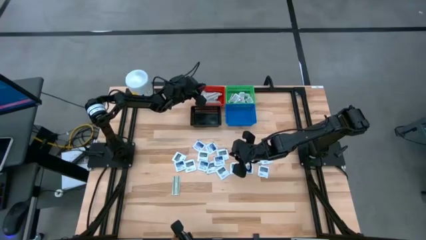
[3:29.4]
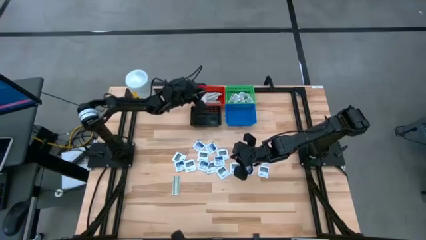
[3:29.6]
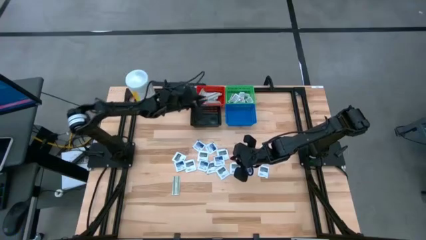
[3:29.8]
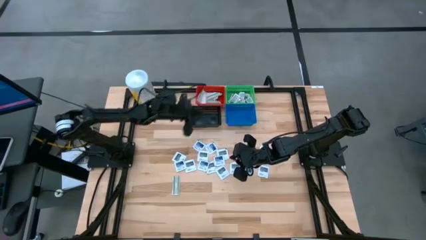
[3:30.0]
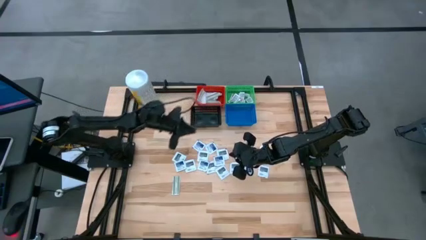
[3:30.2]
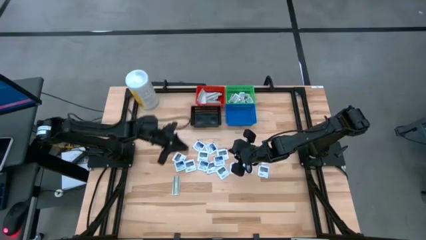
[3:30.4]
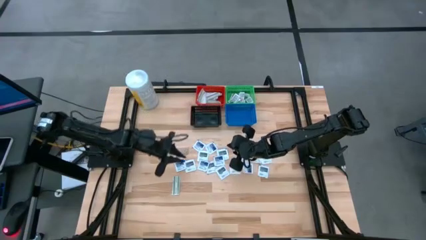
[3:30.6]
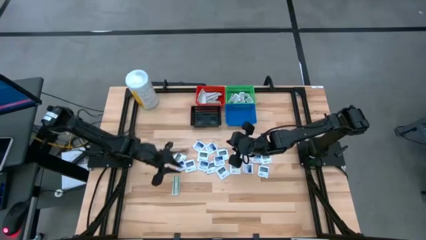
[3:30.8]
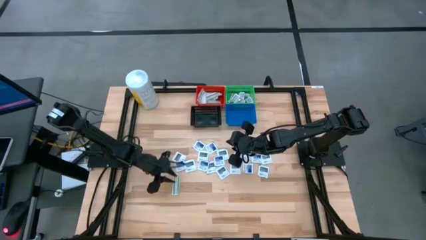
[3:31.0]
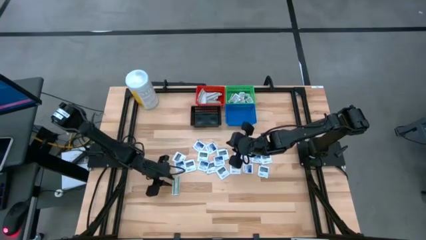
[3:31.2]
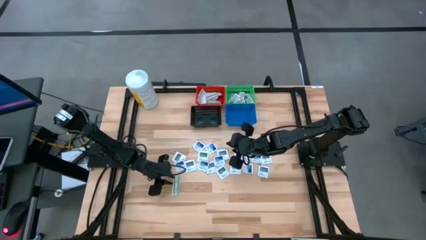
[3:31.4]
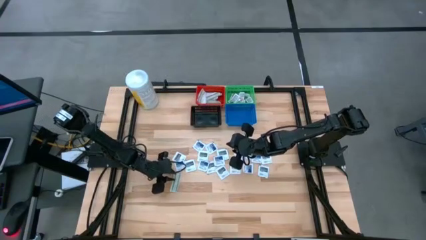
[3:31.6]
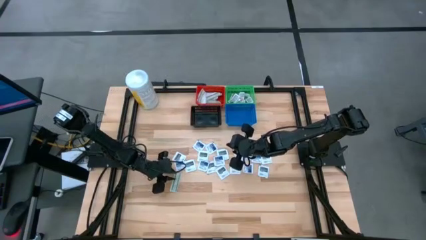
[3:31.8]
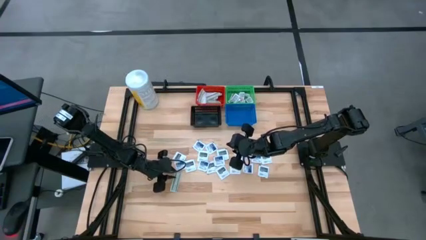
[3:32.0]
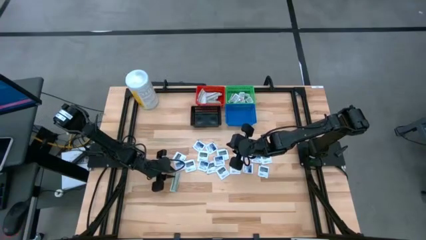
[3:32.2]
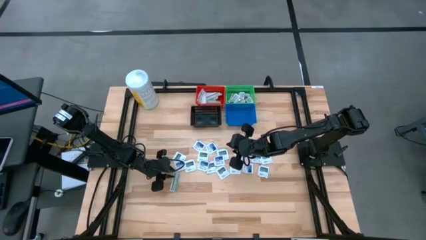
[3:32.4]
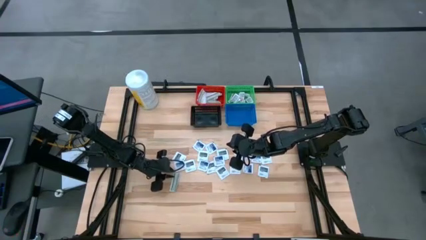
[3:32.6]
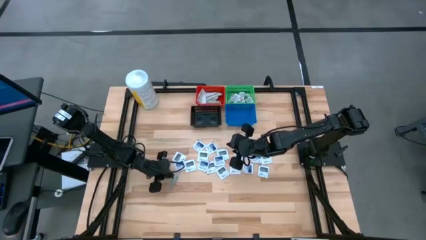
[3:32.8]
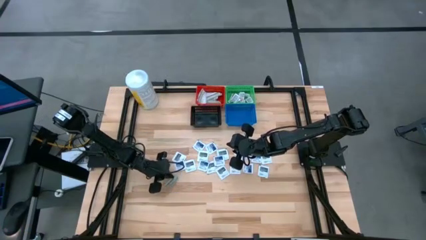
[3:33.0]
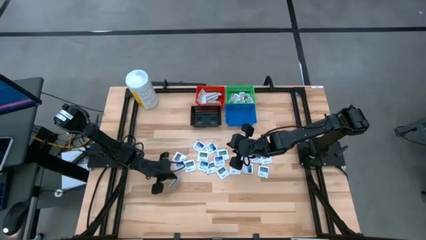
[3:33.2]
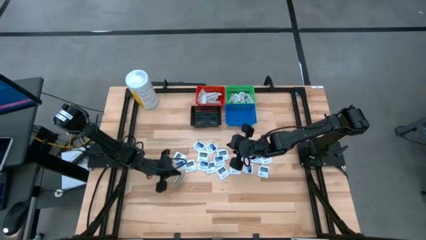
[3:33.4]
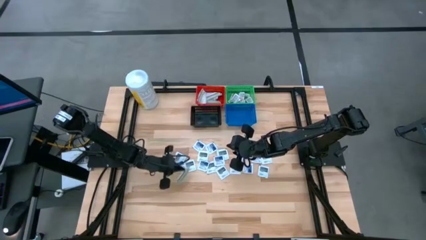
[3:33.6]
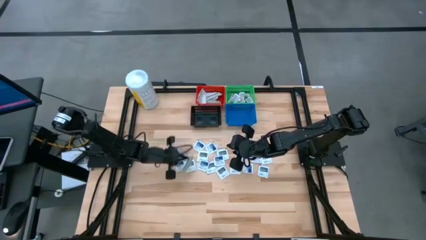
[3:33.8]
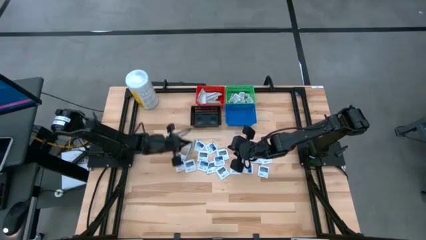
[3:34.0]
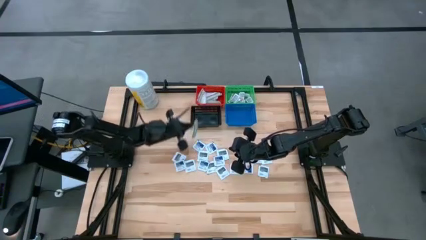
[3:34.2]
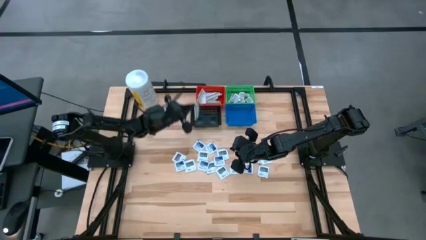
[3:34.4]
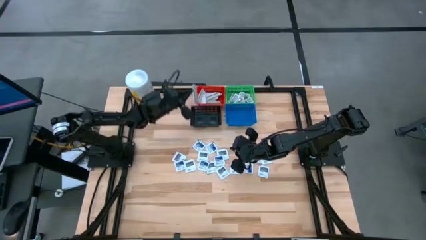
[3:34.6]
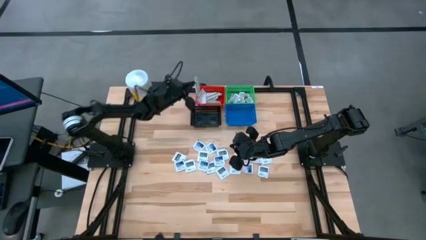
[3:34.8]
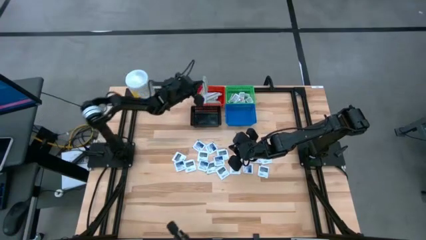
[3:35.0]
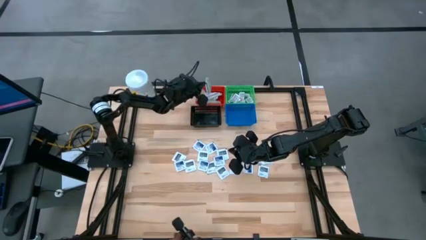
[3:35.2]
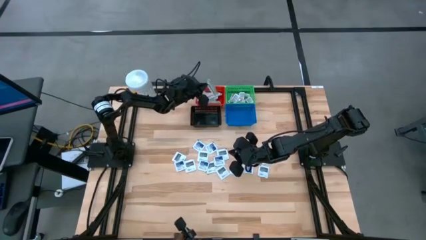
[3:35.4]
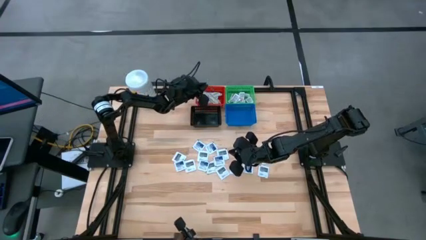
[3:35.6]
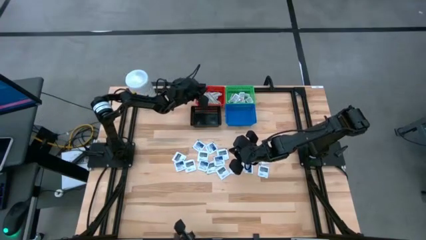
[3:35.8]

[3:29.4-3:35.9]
Task: Pick & Place First Aid Supplies
Put the bandage into the red basket

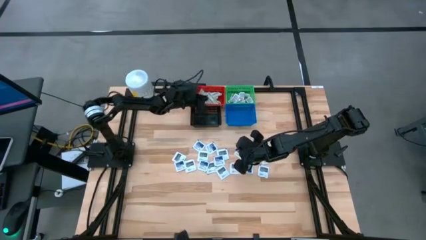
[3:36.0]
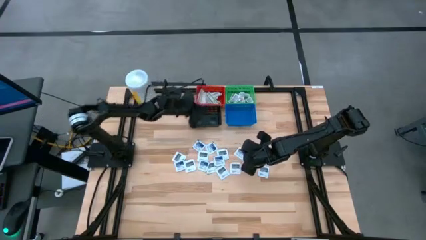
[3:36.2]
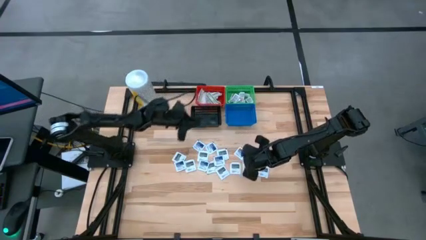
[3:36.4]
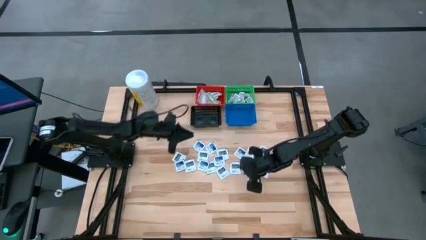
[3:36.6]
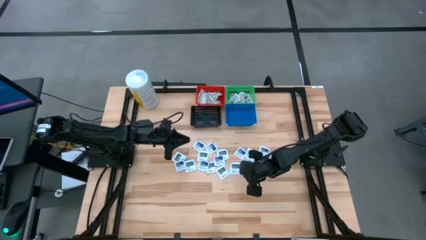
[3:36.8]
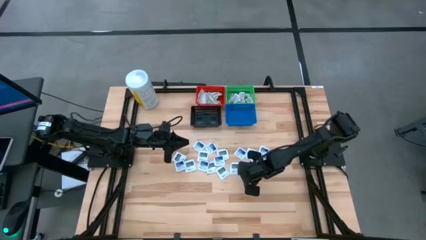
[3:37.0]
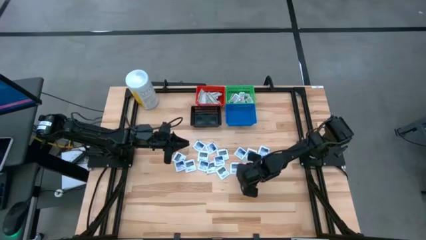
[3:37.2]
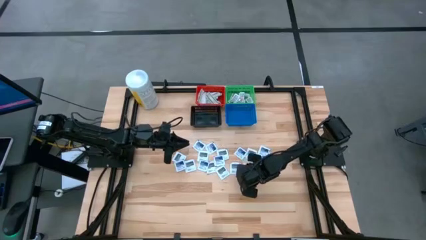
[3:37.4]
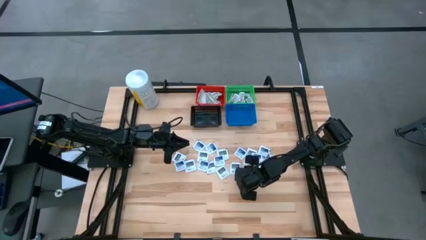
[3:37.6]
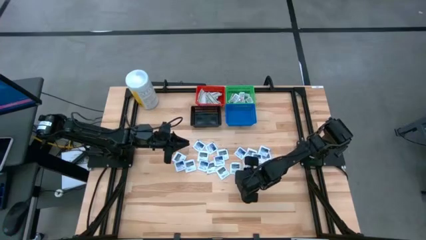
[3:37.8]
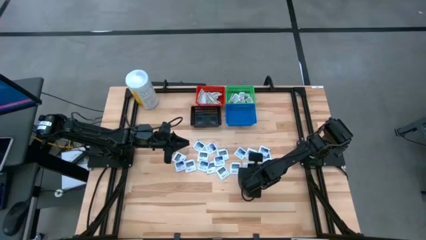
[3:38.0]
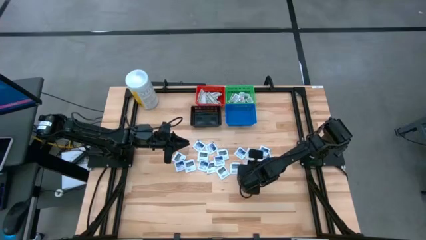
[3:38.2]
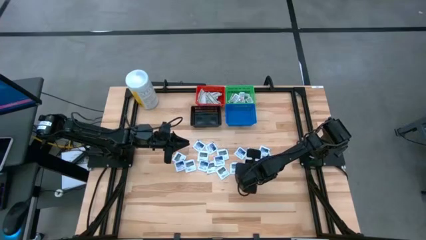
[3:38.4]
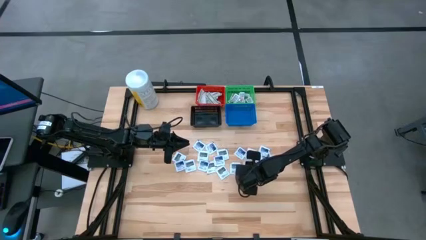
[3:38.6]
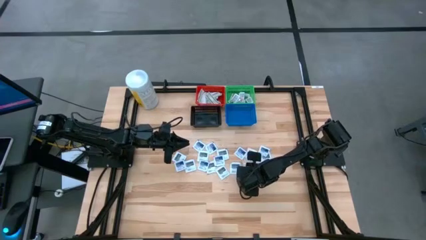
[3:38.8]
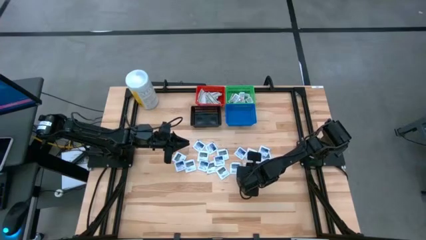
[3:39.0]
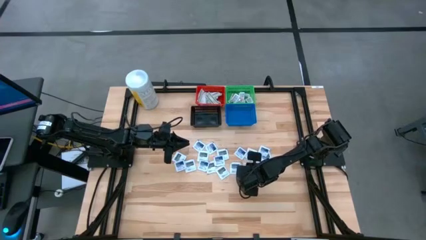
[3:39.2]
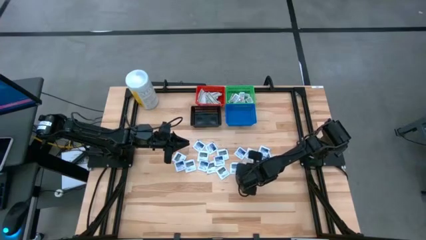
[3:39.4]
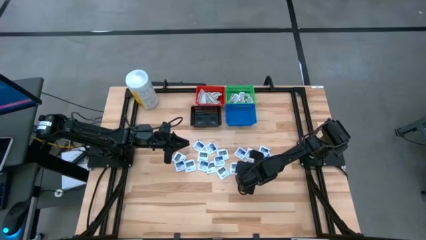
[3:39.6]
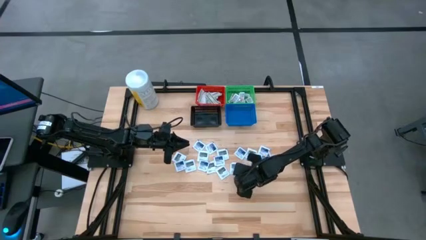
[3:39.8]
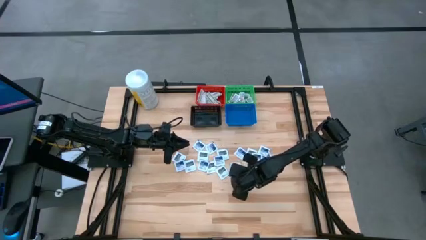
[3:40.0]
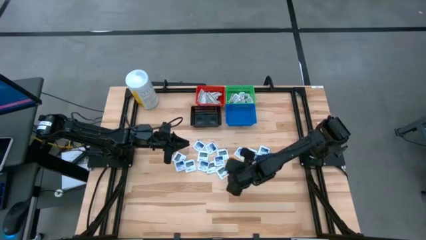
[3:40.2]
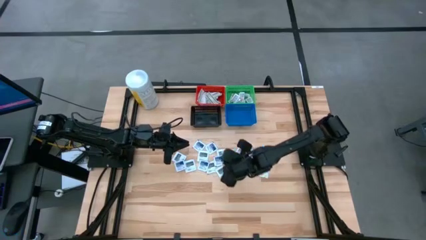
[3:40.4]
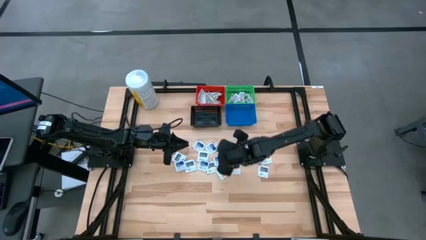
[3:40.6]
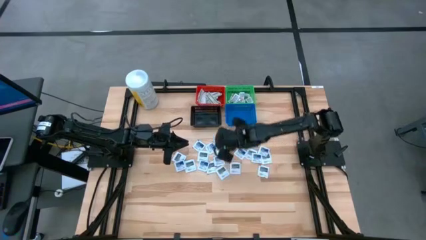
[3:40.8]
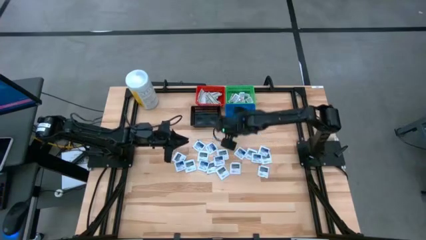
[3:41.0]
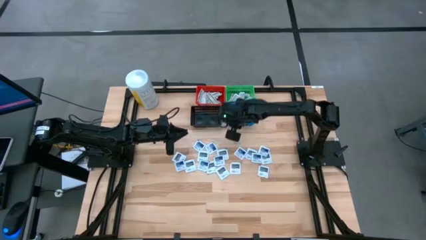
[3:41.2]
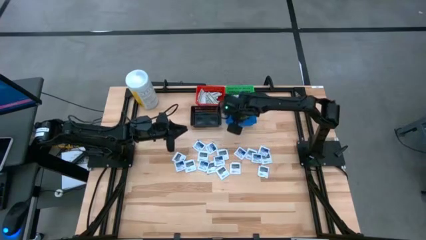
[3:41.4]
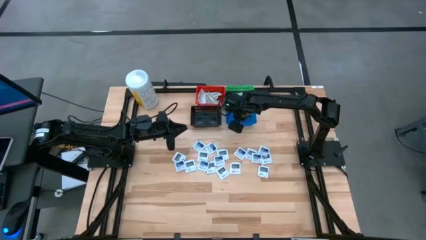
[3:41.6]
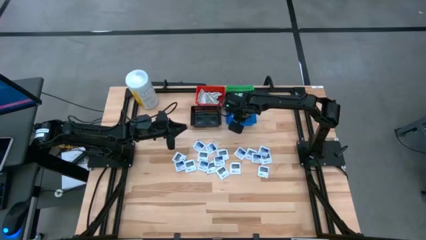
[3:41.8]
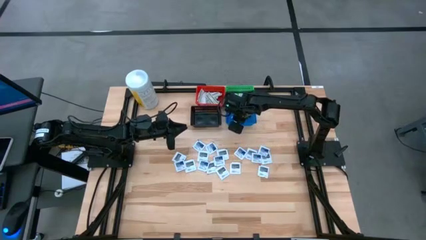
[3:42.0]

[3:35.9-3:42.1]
Put the alcohol pad into the blue basket

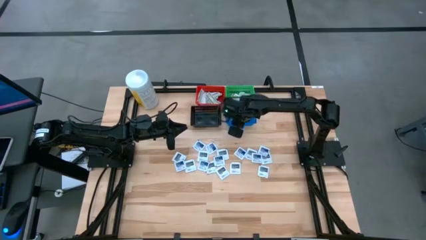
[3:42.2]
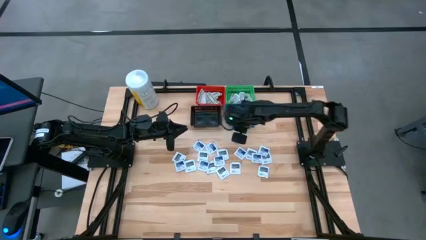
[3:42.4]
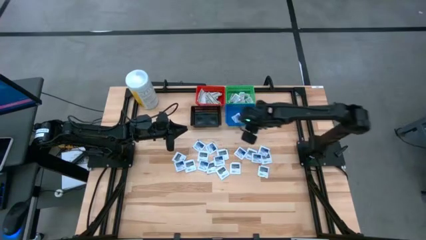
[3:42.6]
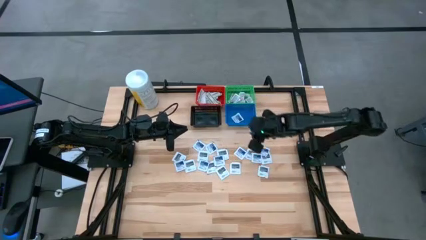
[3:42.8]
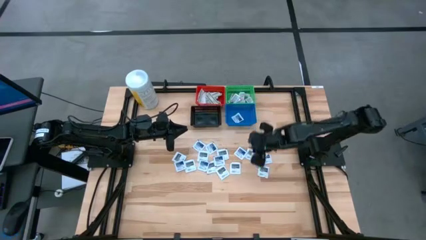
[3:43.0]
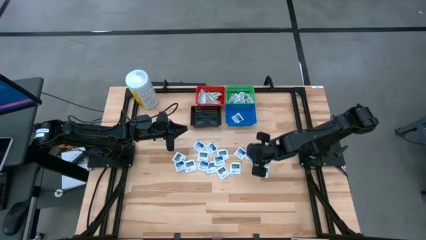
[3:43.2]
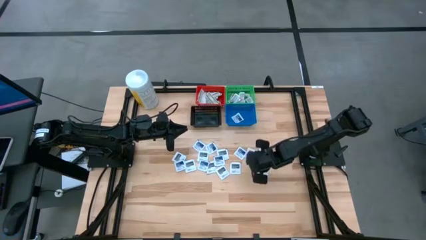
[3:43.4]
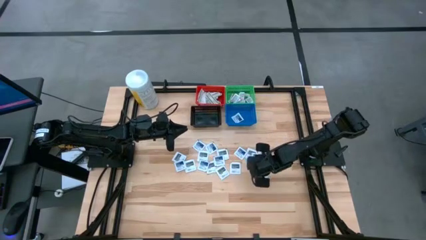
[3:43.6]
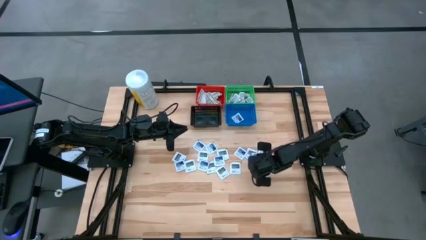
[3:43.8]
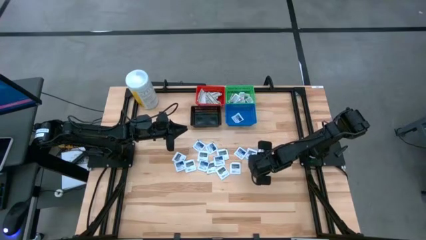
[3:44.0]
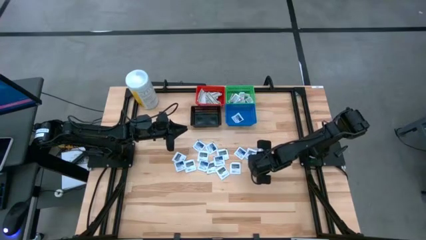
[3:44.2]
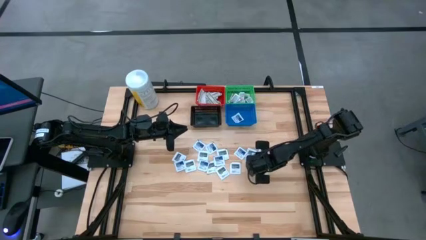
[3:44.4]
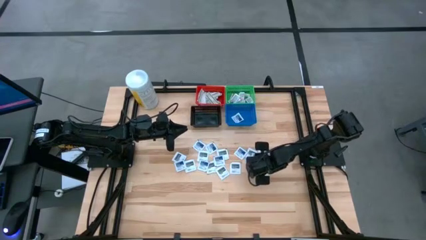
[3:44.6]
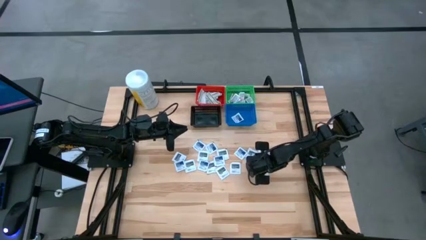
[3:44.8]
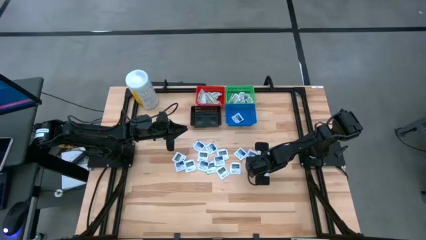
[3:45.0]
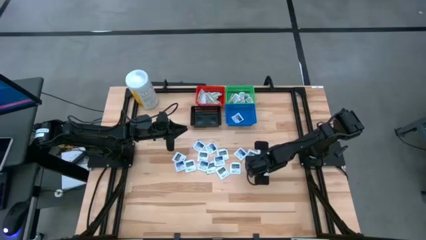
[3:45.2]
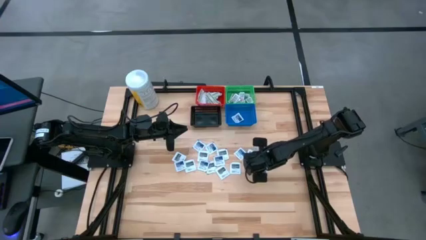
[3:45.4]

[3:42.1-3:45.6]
Put the alcohol pad into the blue basket
